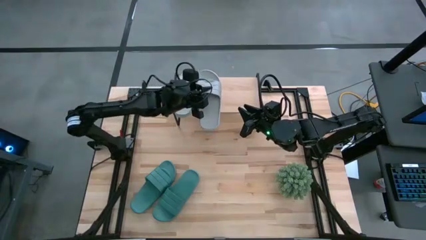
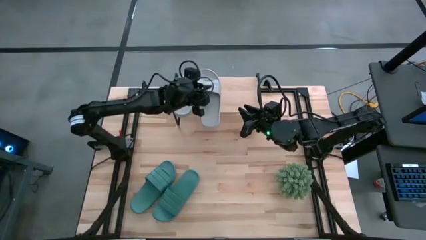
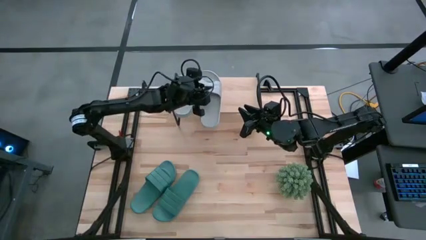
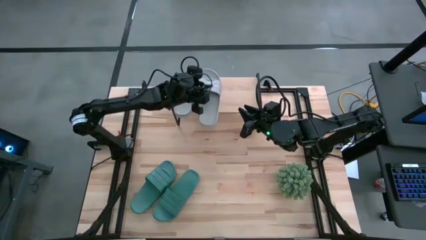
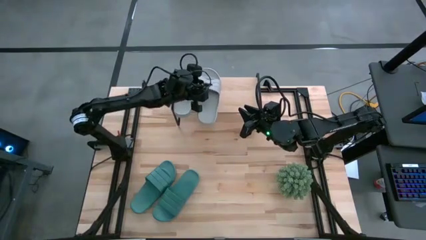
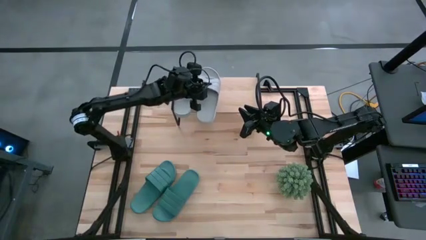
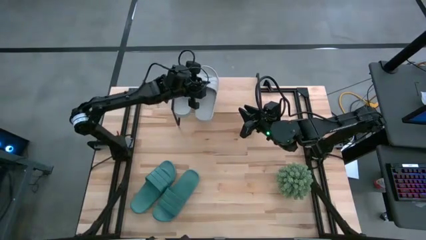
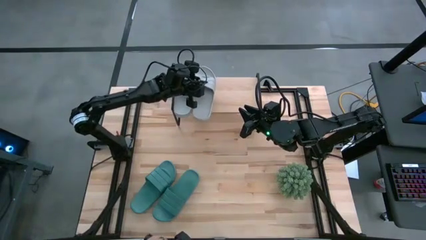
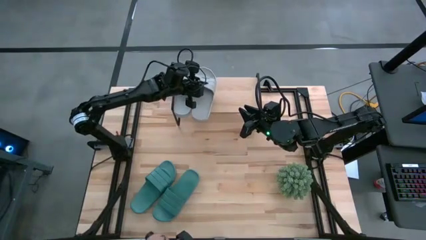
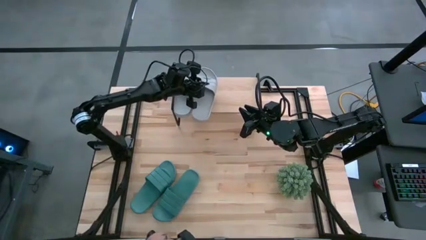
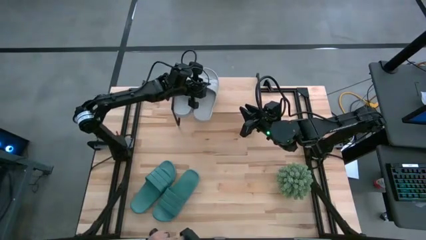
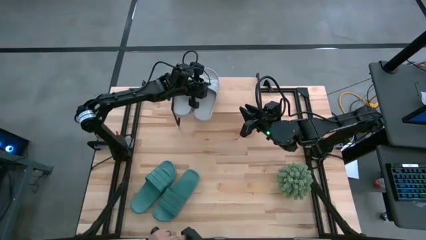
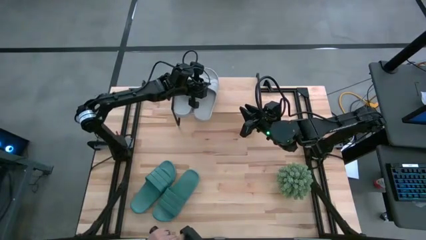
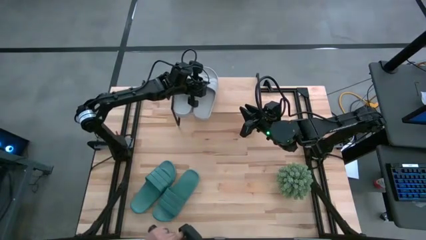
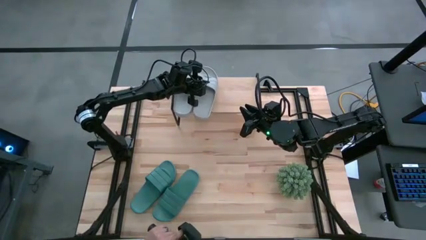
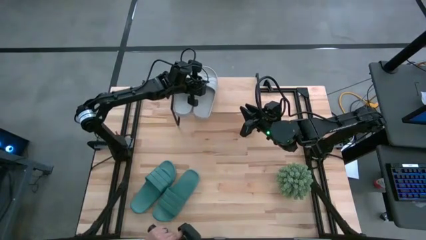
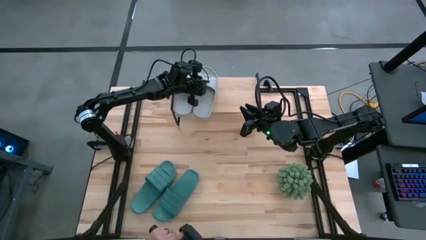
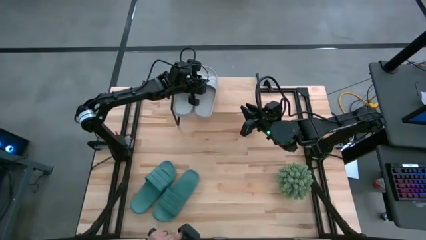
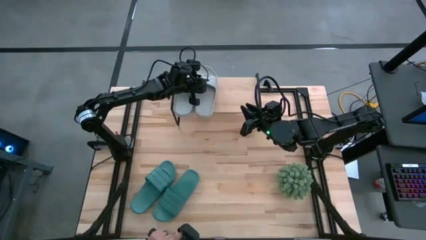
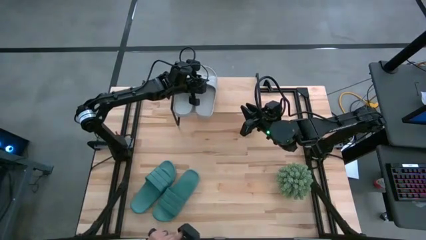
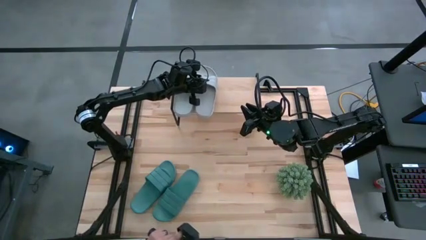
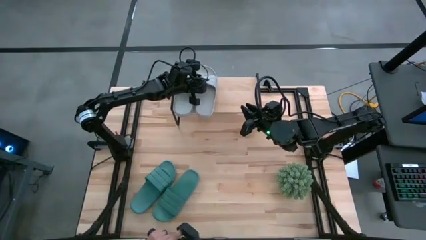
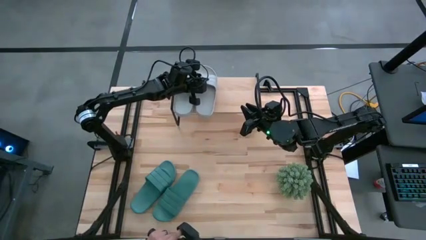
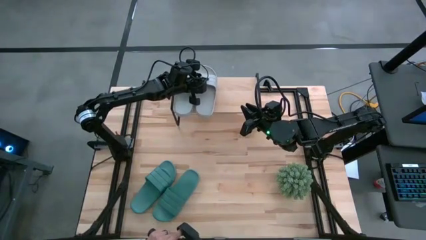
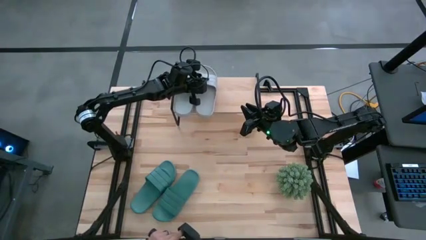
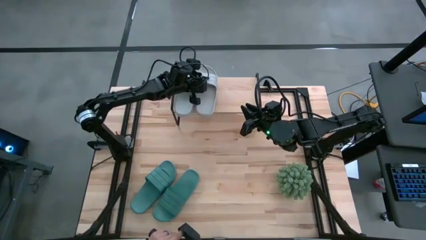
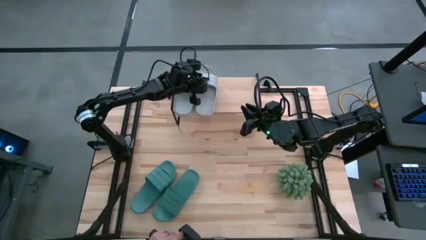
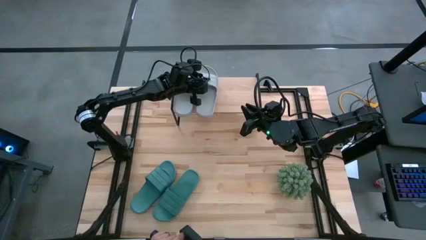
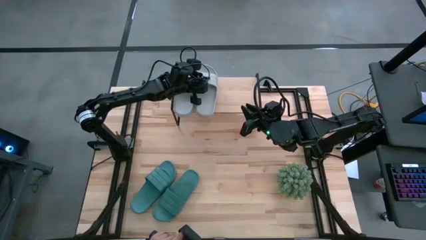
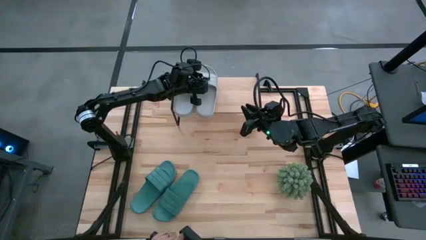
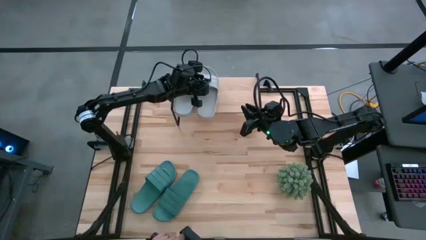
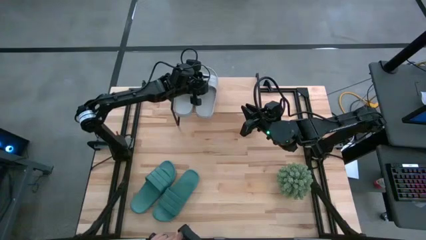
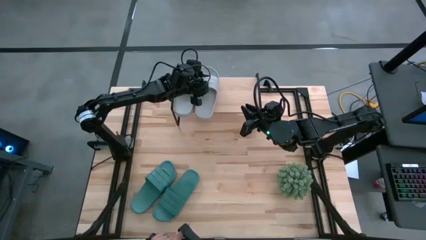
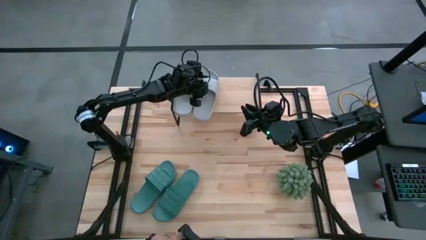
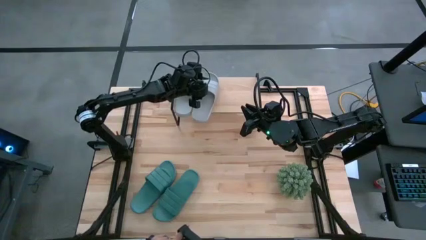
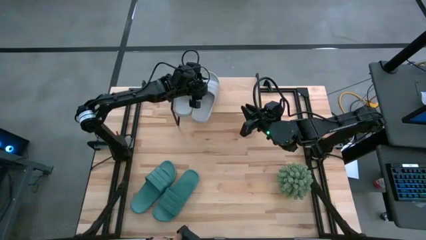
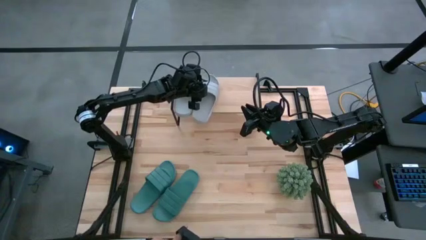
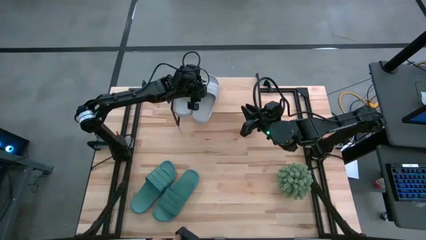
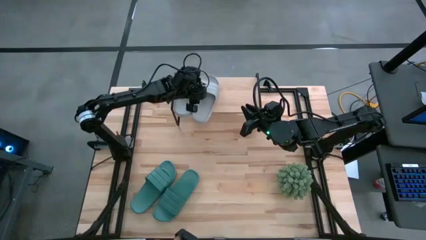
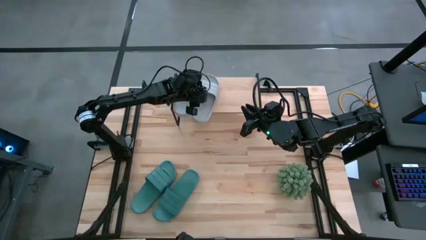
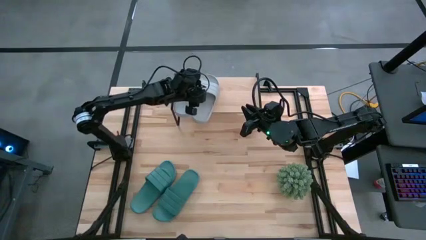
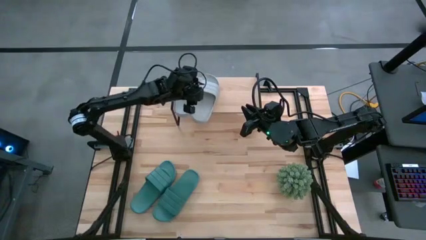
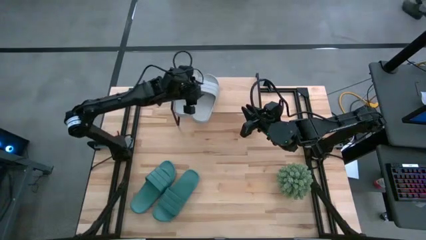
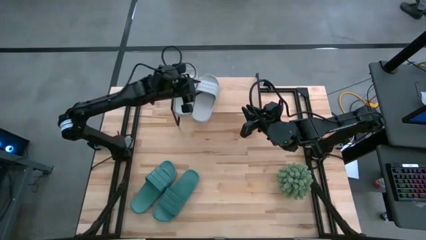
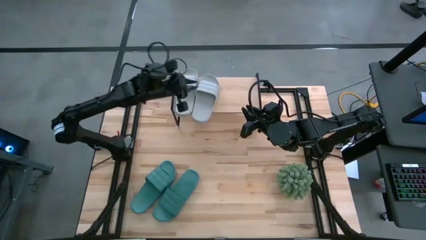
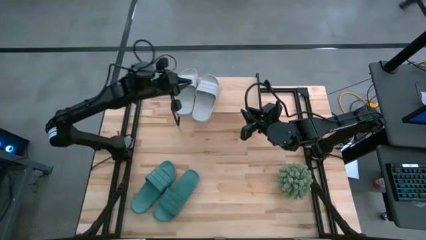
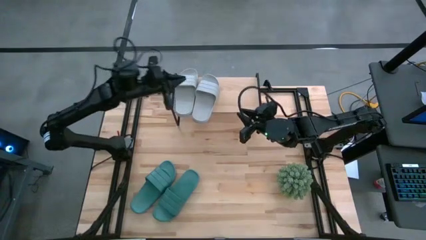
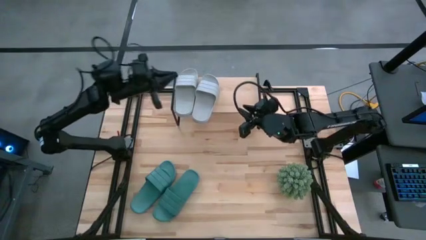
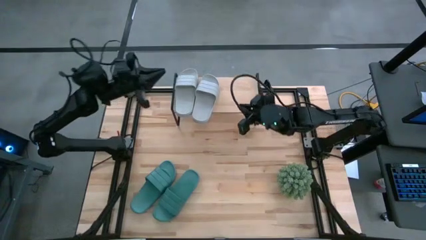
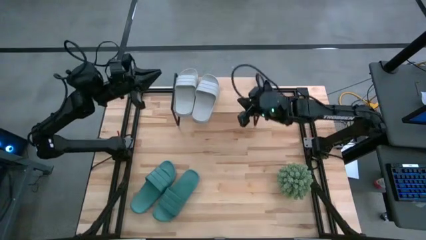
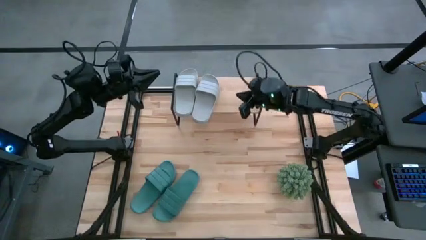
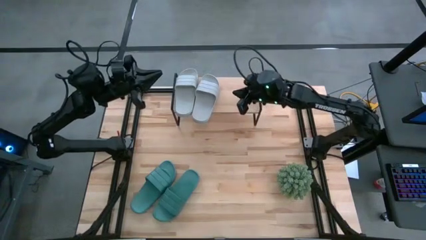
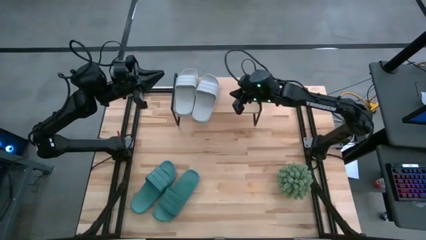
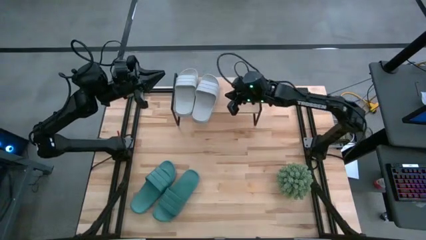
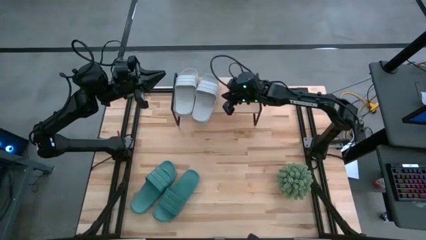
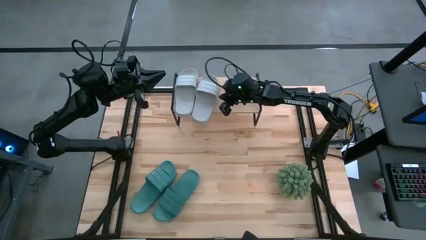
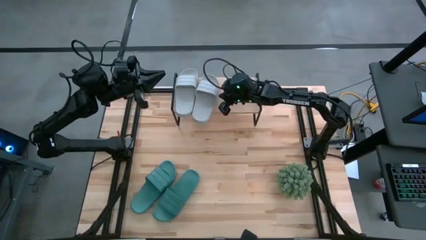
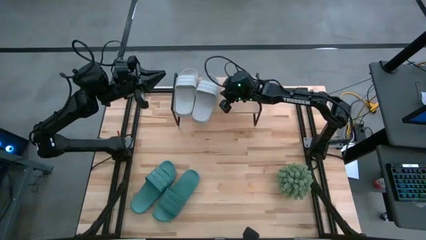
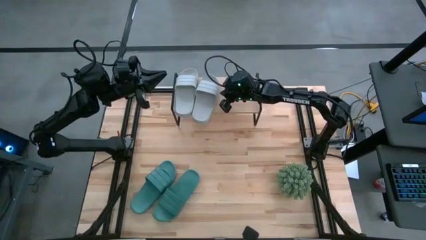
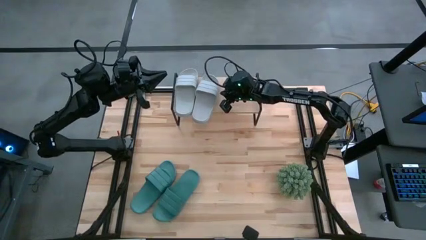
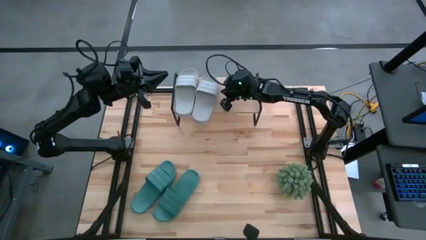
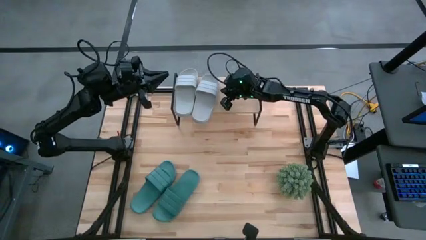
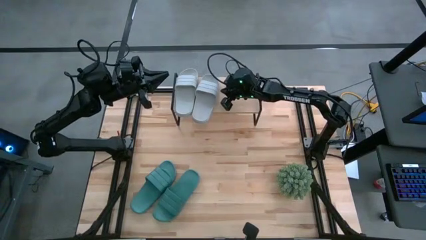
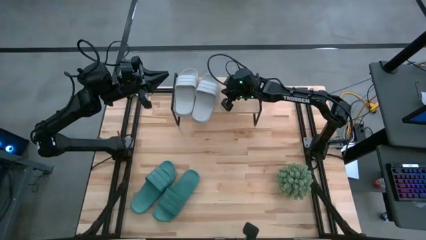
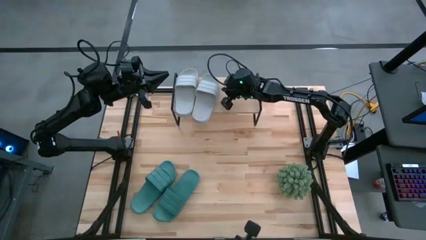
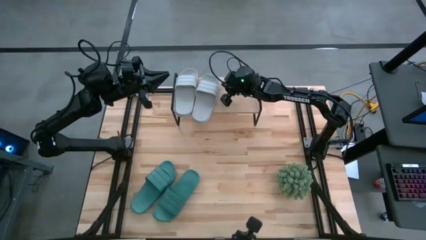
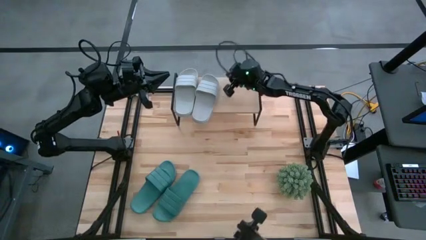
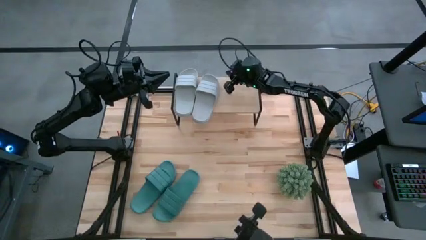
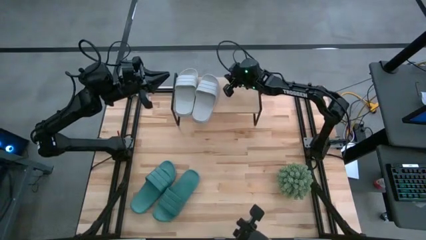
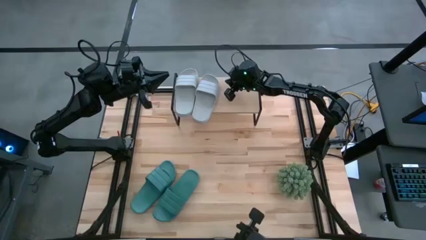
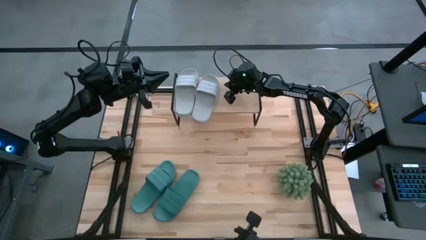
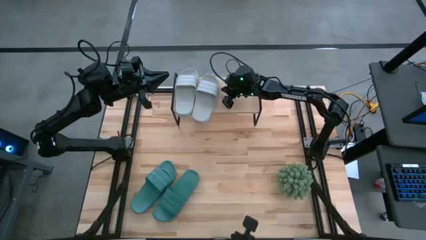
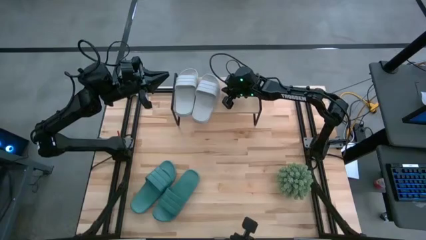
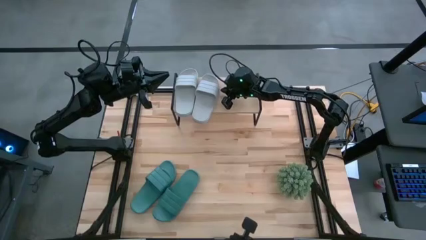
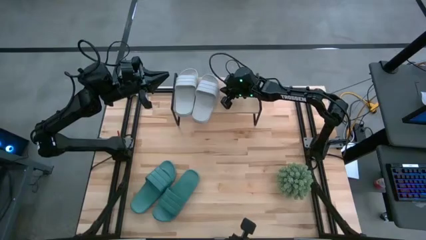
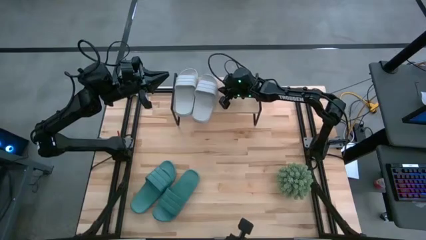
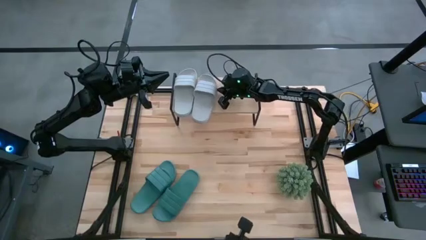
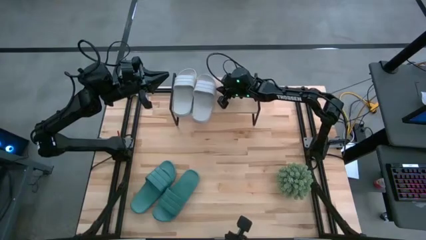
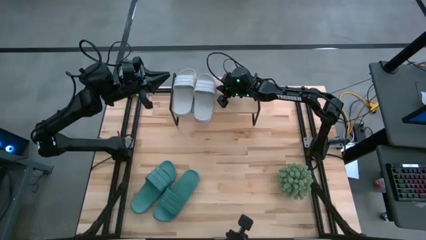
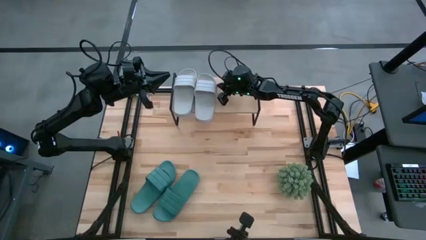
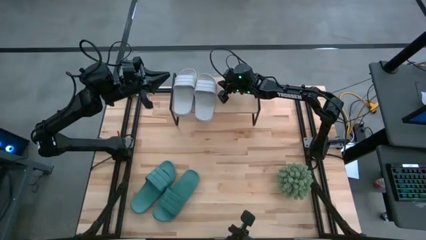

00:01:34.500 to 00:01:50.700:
Task: Pick and place slides into the shelf
Put the gray slide on the shelf
